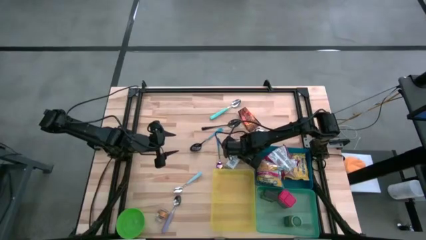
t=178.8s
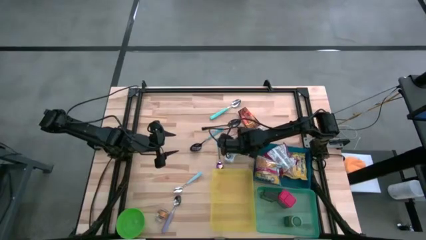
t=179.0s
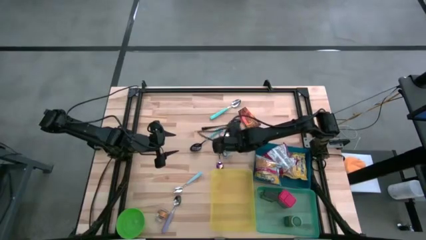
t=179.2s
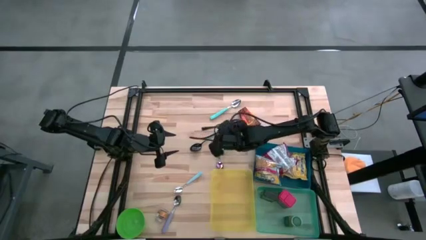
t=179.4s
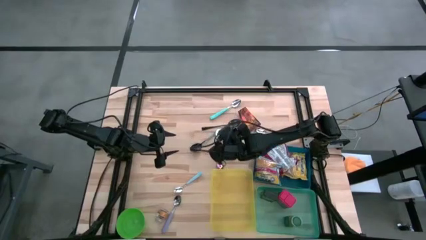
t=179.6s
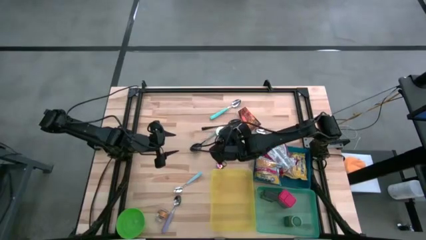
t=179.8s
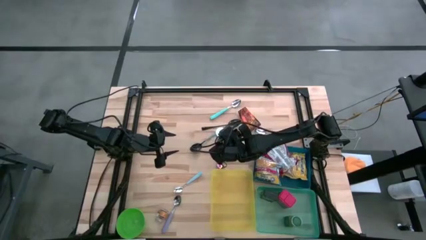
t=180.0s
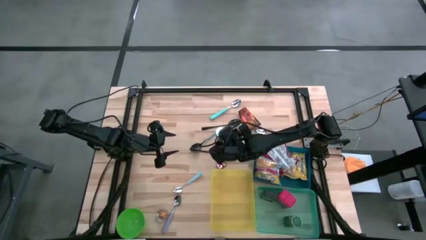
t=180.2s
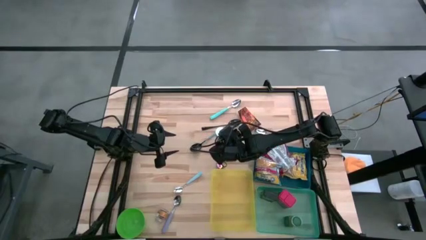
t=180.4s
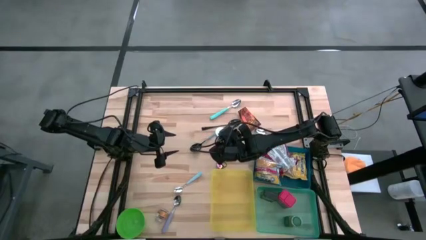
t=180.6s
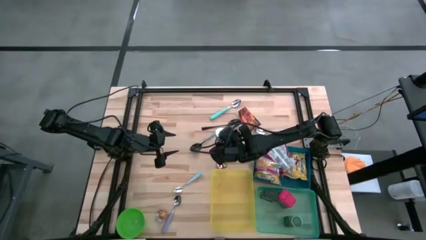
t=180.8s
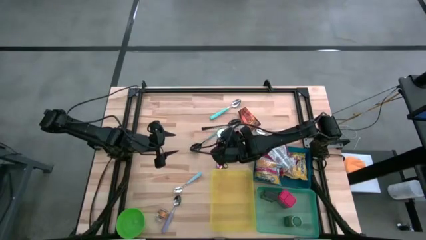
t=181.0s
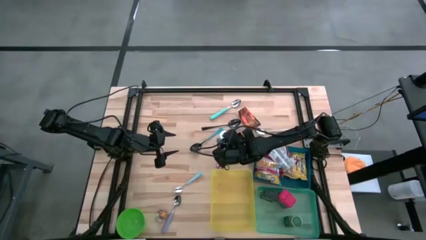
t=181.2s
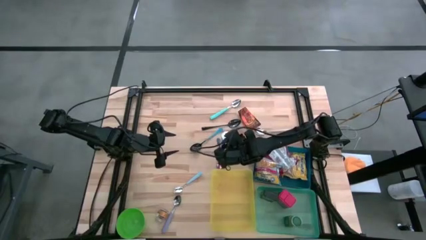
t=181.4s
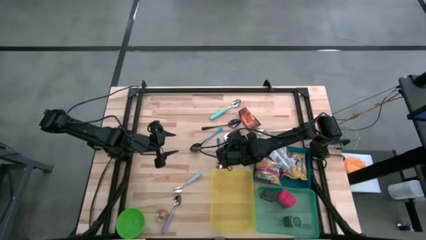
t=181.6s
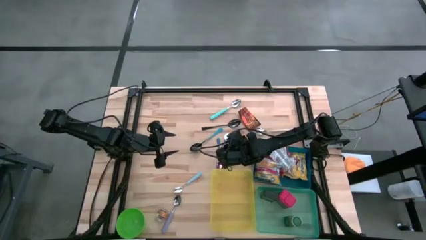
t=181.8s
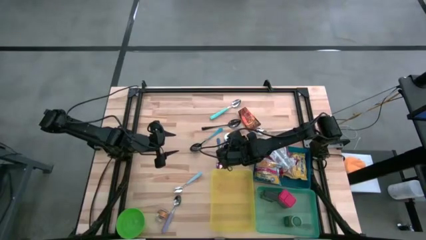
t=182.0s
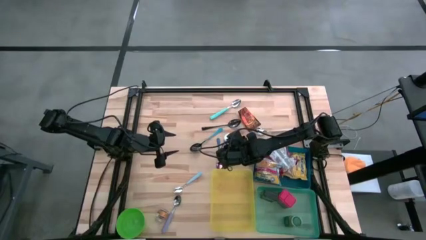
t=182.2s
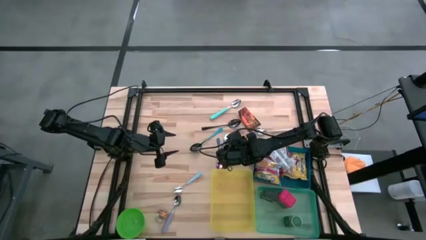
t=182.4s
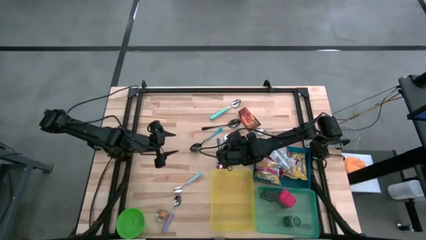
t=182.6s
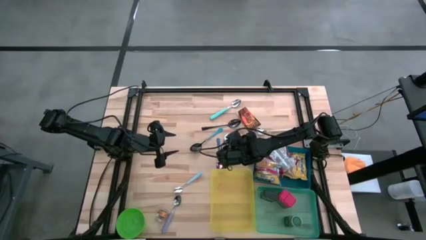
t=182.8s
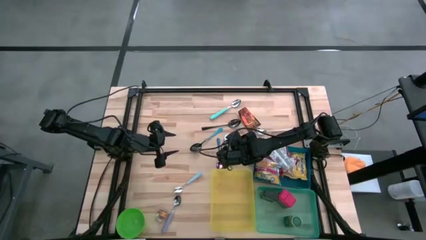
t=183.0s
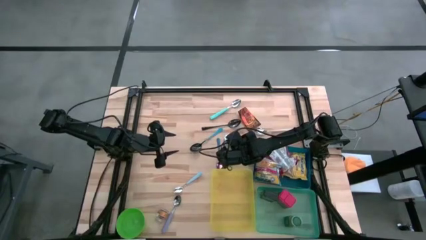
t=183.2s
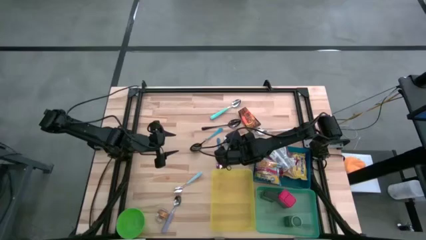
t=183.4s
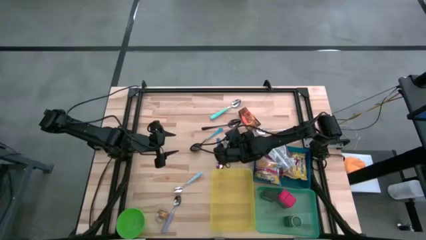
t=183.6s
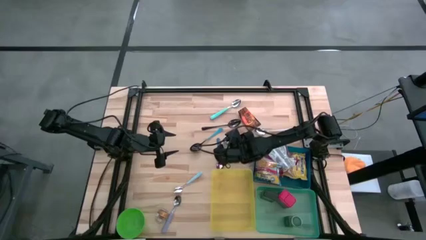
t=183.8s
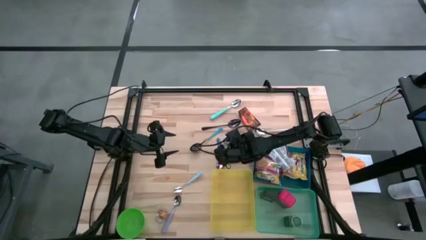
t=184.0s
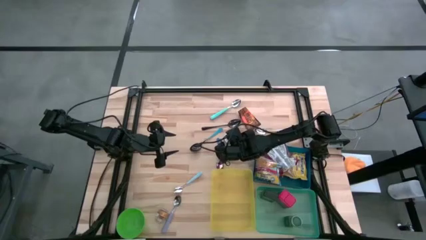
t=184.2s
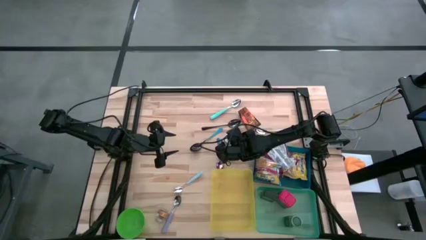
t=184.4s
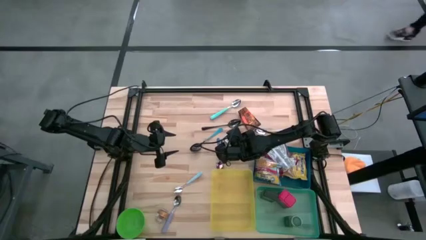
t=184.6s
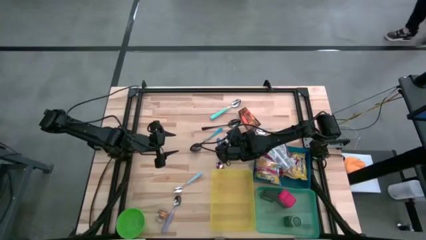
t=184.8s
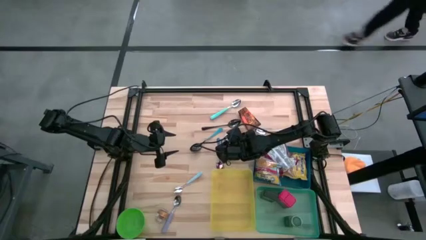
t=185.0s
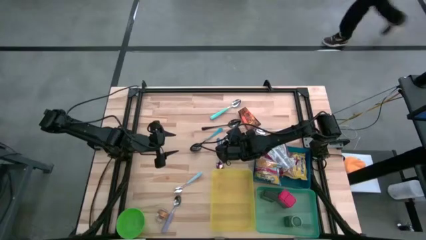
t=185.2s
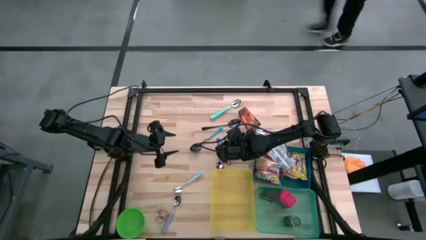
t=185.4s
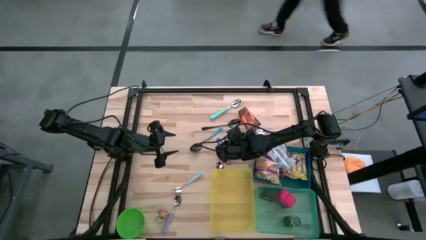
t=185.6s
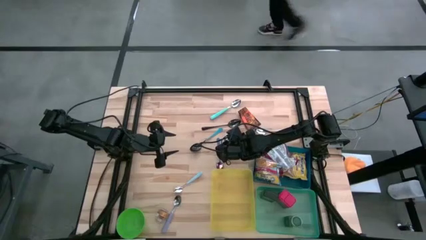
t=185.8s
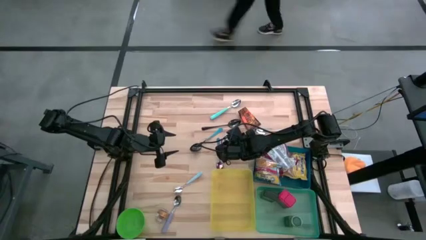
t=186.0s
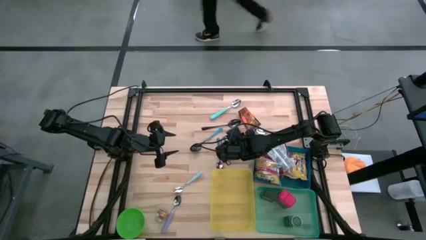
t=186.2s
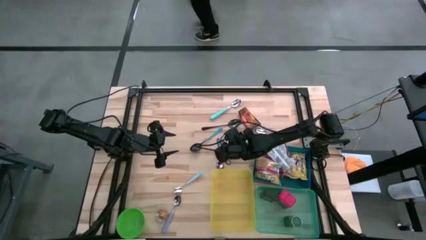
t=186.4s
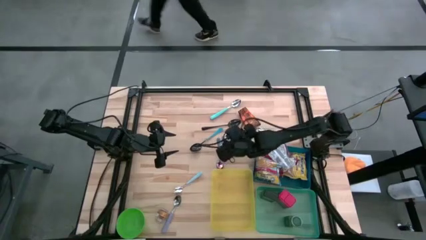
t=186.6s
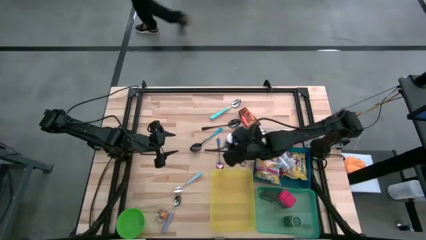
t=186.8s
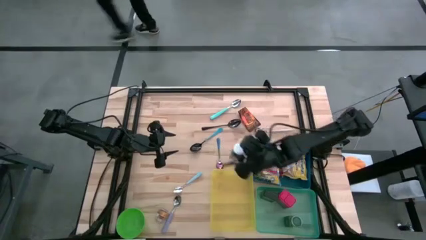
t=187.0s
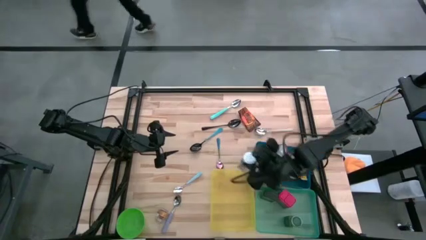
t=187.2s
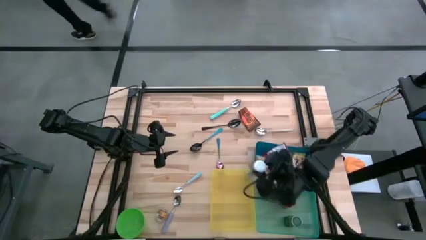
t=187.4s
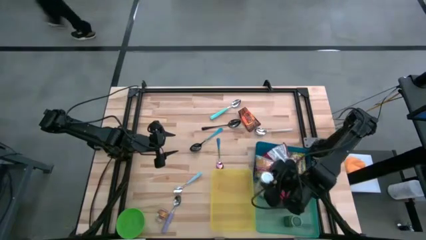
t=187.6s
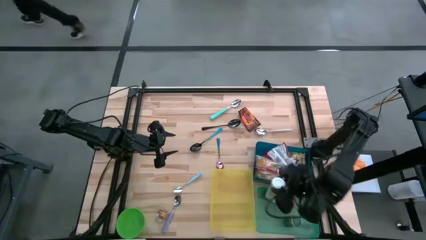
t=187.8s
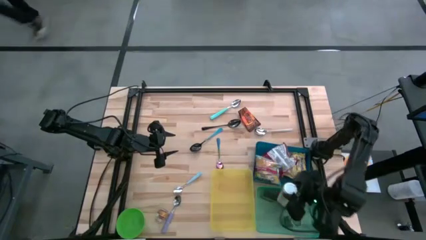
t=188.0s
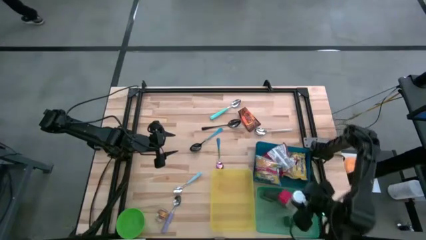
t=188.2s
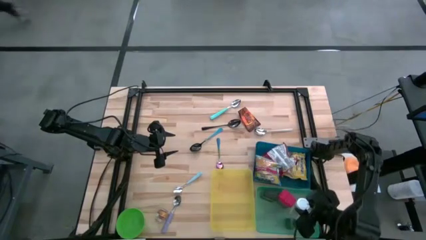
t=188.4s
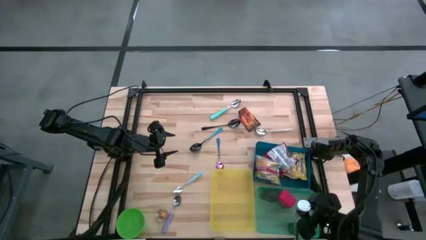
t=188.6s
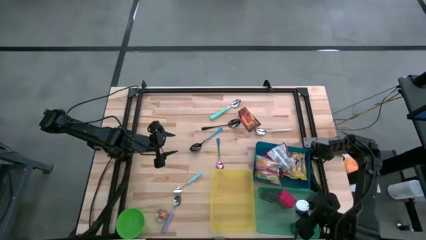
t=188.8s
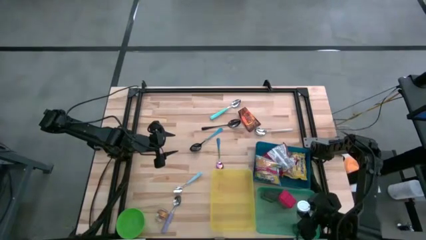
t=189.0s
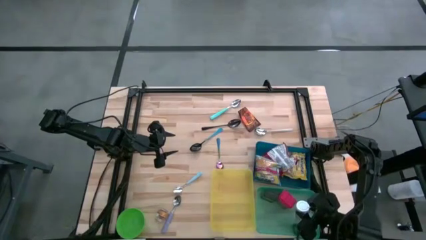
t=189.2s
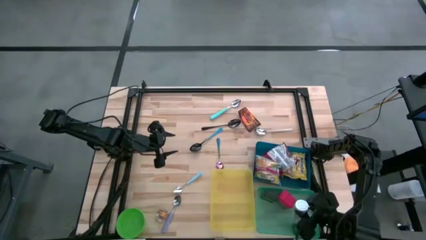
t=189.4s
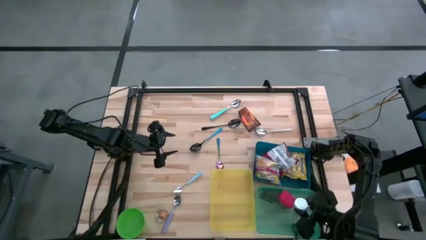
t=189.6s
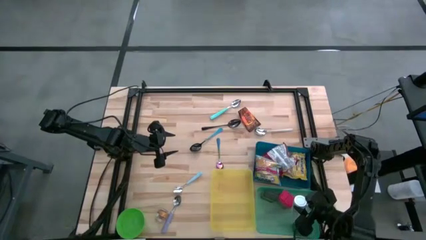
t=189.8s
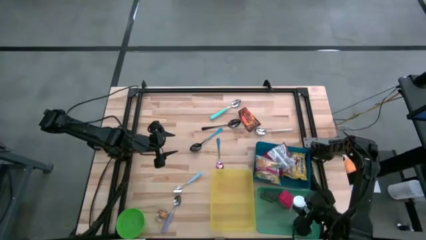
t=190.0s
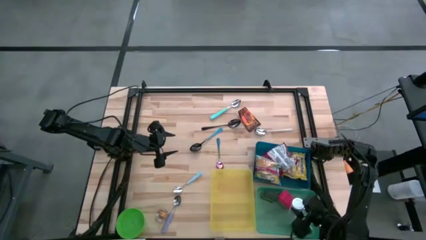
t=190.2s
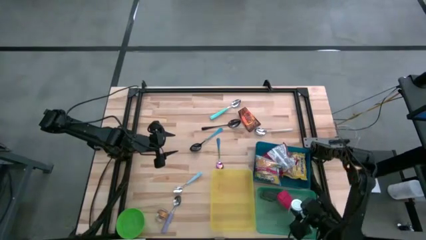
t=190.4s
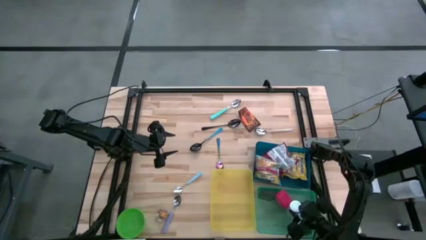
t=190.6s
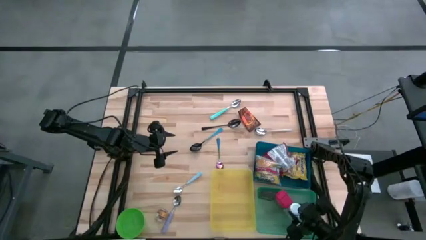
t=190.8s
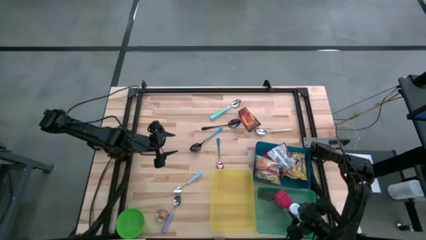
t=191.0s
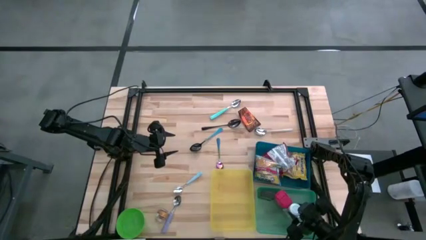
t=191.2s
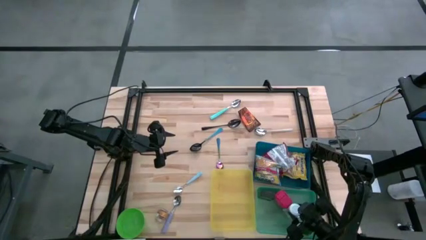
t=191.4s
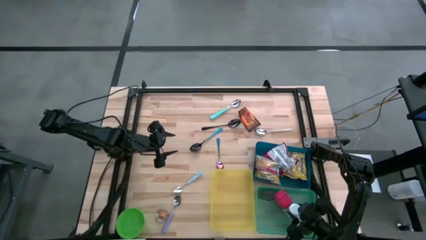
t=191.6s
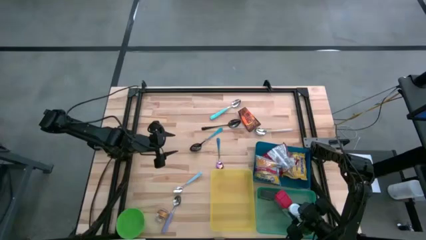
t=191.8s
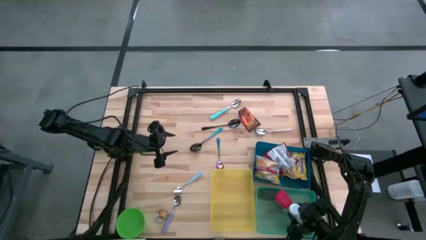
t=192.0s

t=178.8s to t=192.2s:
Put the white seasoning bottle into the green bin
